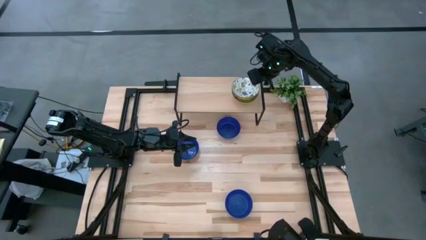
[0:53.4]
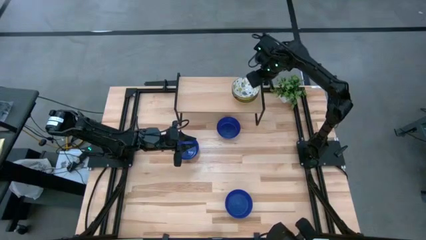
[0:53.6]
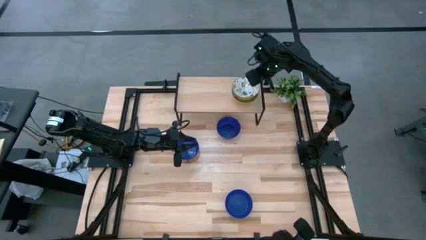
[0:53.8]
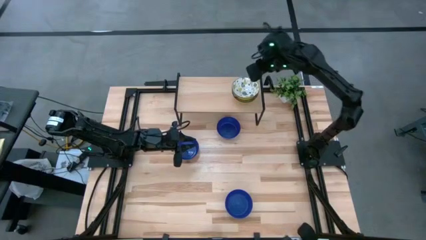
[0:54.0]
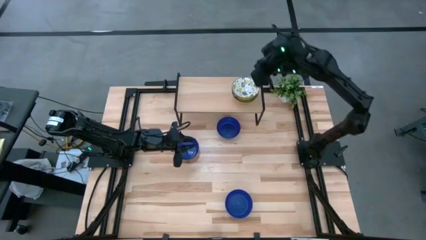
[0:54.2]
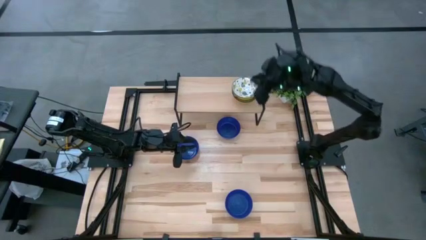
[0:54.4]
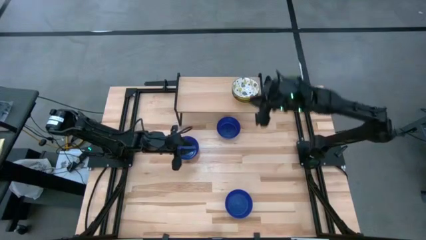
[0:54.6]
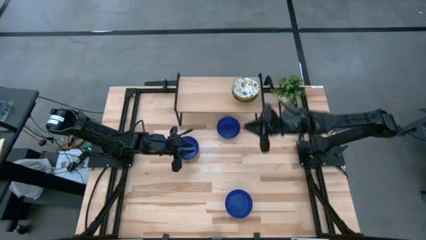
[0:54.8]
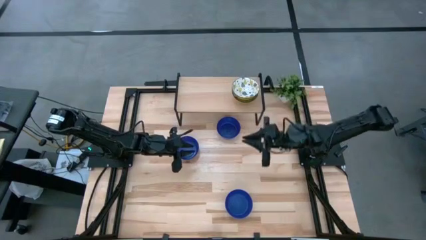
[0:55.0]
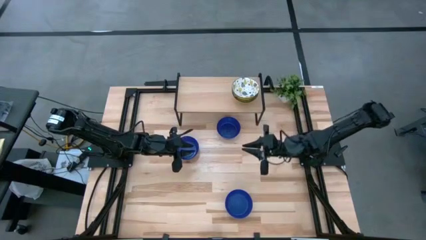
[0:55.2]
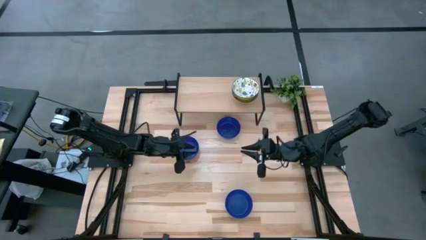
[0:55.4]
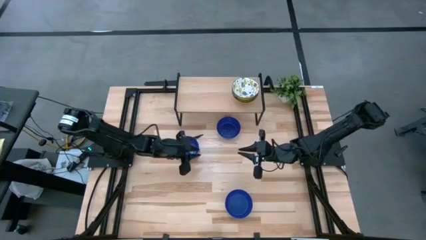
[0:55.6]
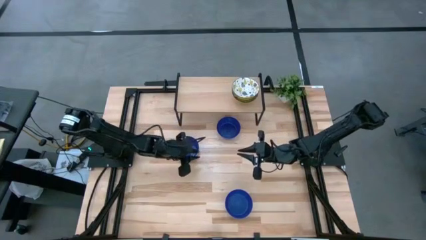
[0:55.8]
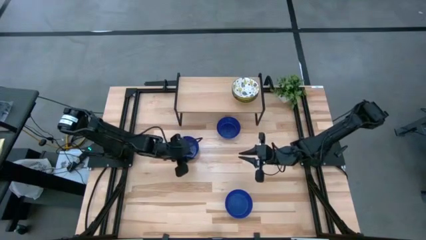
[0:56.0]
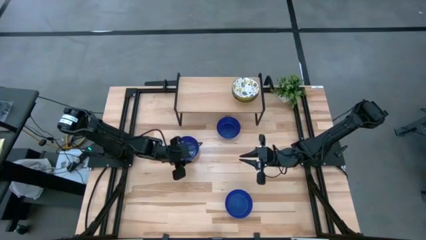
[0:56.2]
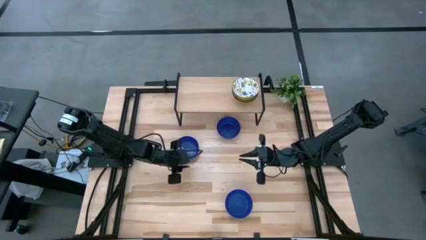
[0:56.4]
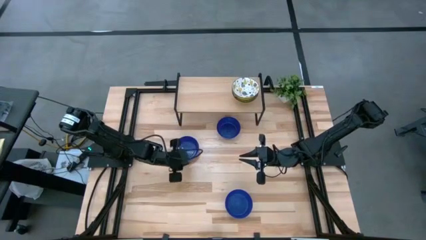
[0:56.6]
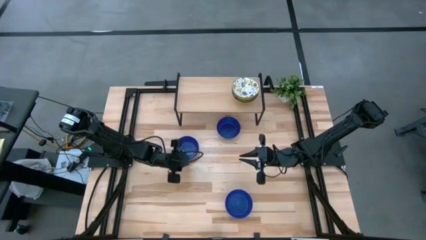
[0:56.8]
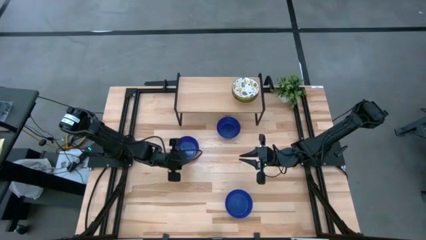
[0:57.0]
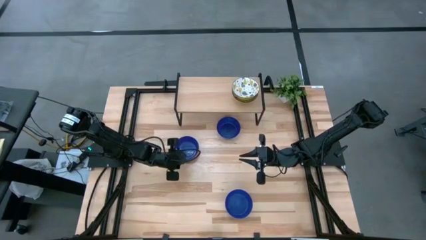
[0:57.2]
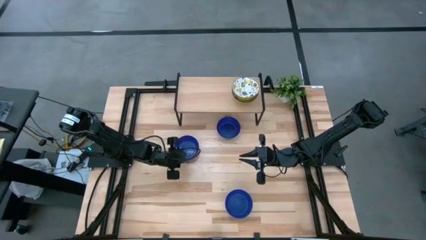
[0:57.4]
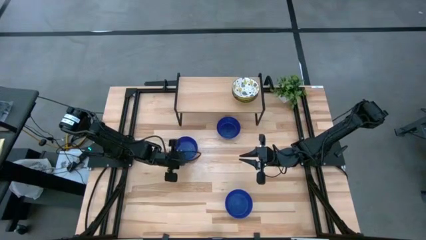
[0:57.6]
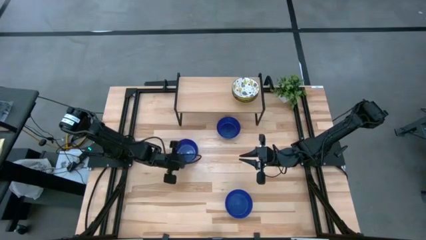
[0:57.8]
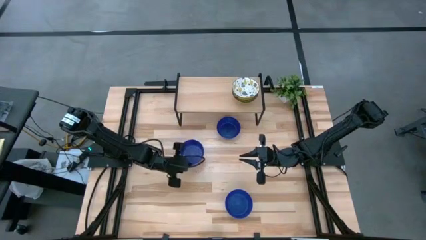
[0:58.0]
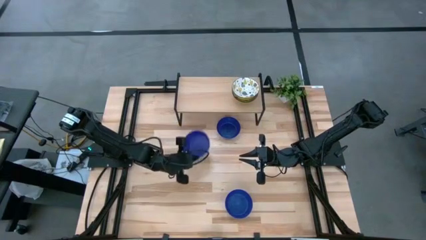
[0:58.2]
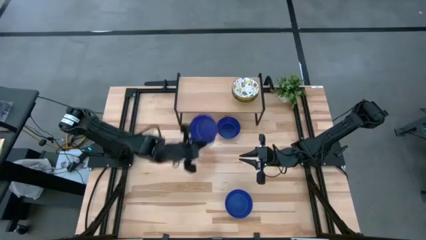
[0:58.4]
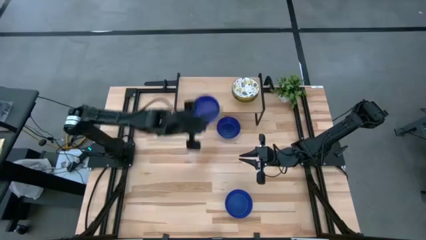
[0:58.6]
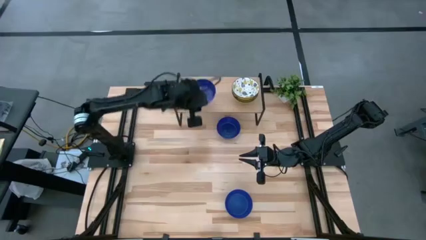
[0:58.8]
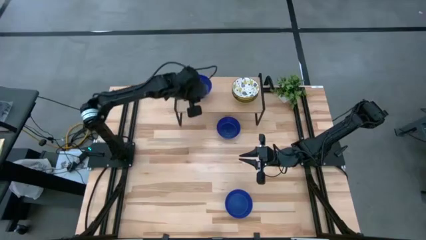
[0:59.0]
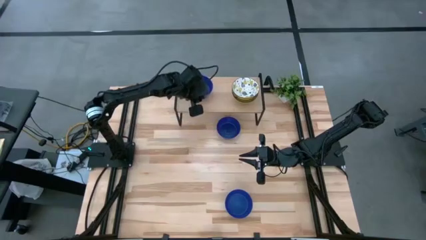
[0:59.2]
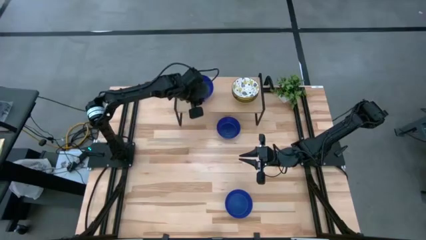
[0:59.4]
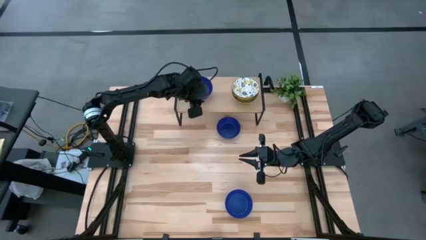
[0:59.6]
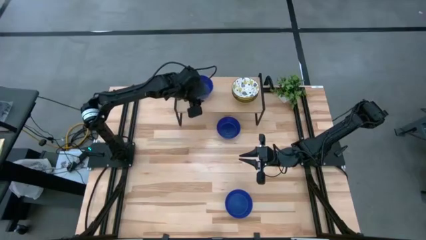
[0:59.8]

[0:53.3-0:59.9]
Task: Pick & Place Mini bowls
Put the top left blue bowl on the shelf
